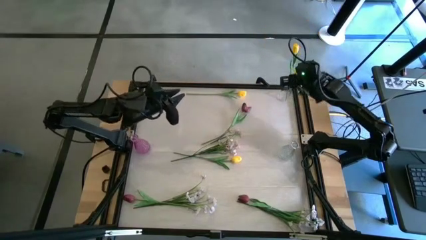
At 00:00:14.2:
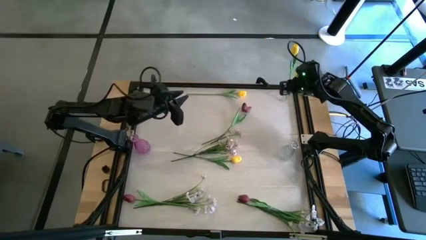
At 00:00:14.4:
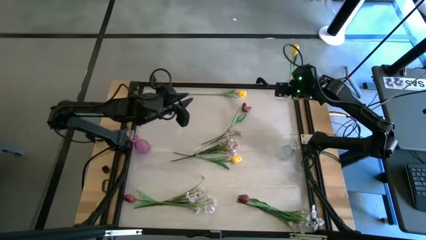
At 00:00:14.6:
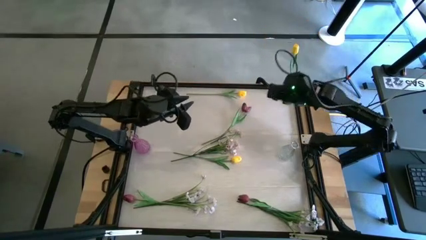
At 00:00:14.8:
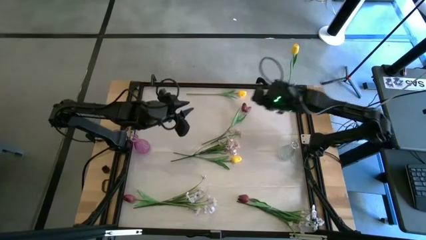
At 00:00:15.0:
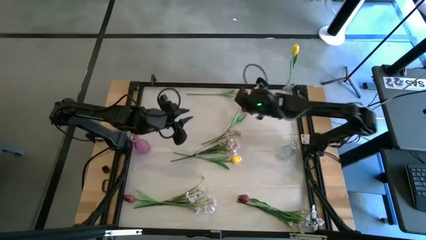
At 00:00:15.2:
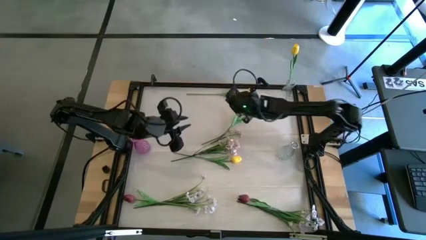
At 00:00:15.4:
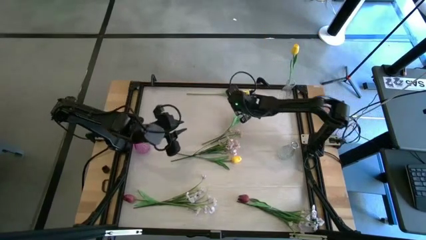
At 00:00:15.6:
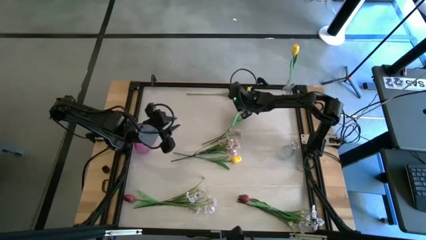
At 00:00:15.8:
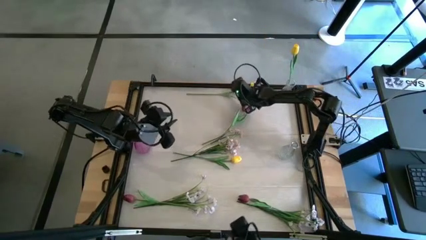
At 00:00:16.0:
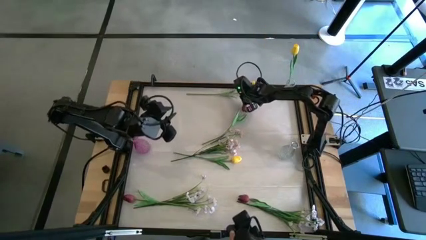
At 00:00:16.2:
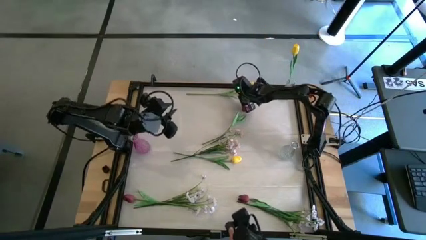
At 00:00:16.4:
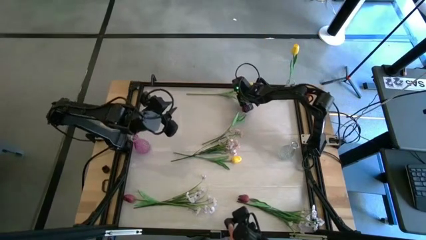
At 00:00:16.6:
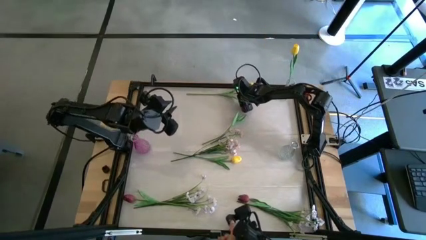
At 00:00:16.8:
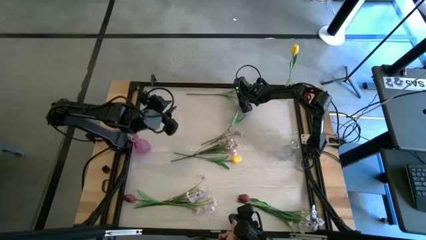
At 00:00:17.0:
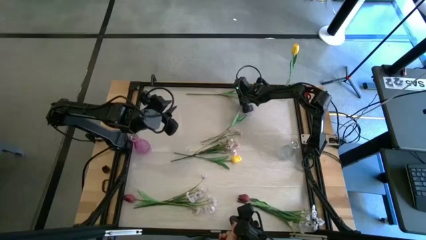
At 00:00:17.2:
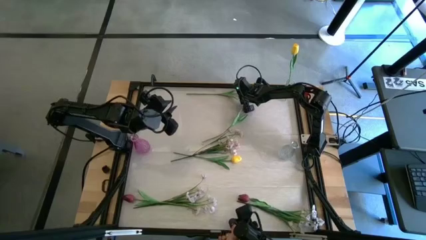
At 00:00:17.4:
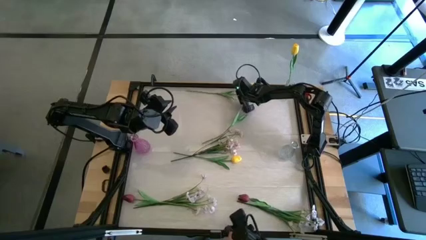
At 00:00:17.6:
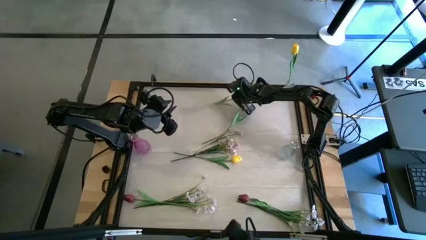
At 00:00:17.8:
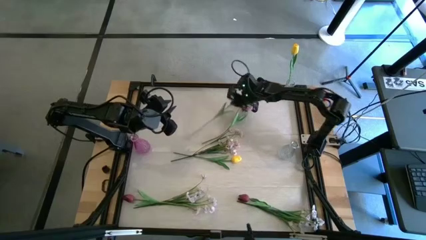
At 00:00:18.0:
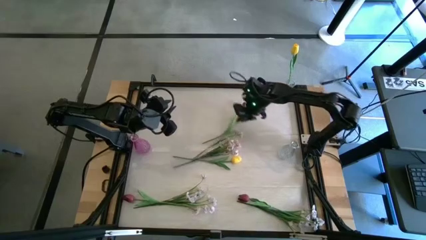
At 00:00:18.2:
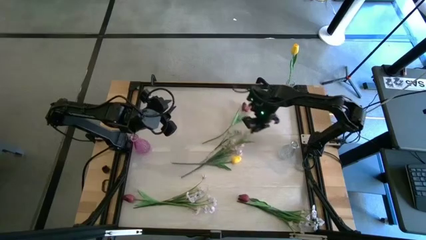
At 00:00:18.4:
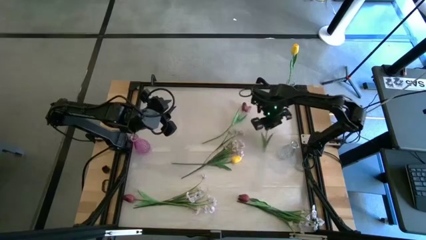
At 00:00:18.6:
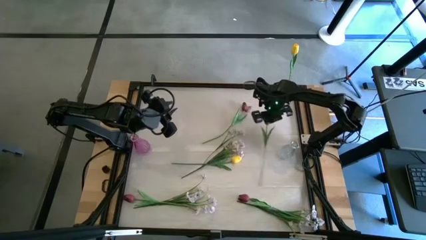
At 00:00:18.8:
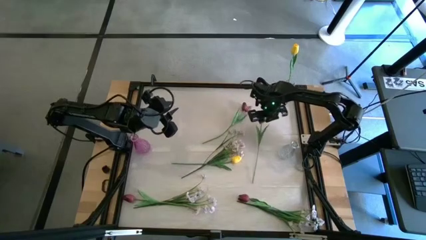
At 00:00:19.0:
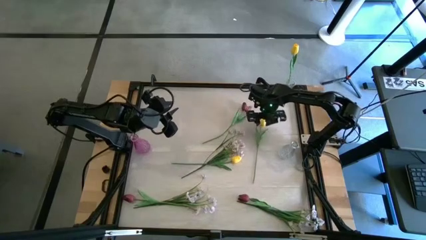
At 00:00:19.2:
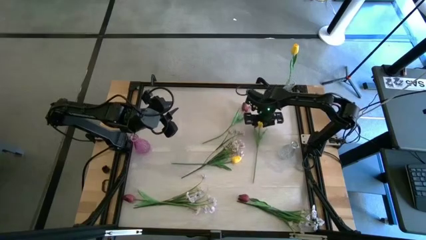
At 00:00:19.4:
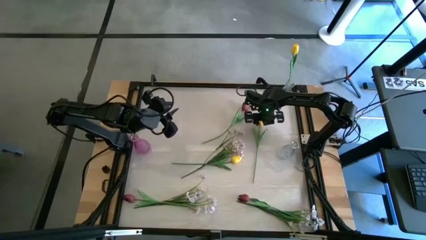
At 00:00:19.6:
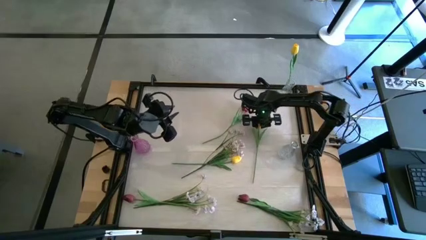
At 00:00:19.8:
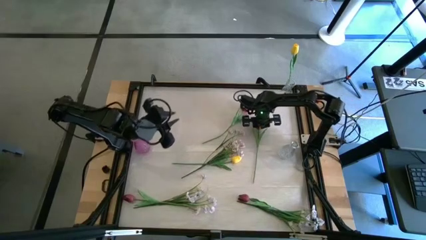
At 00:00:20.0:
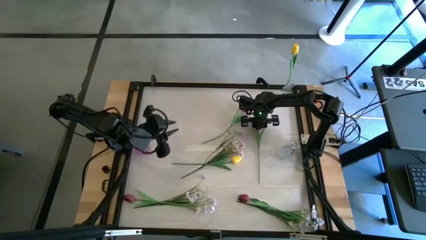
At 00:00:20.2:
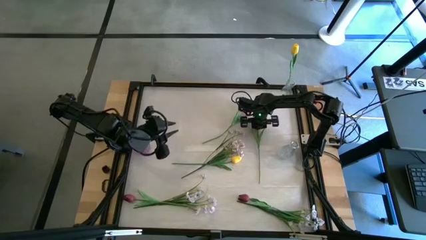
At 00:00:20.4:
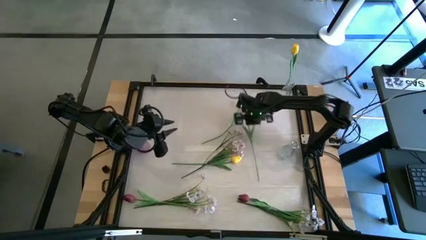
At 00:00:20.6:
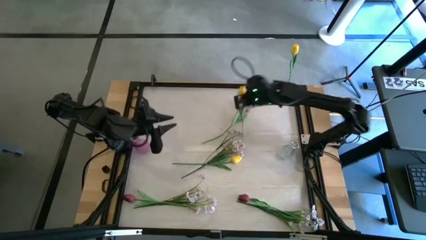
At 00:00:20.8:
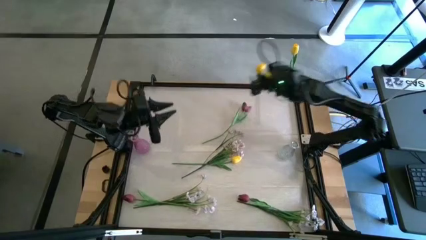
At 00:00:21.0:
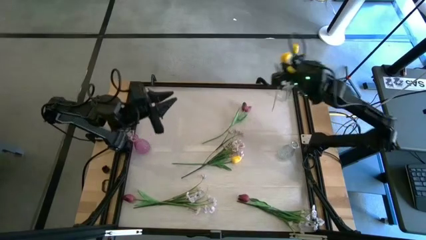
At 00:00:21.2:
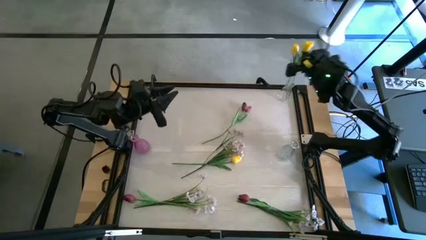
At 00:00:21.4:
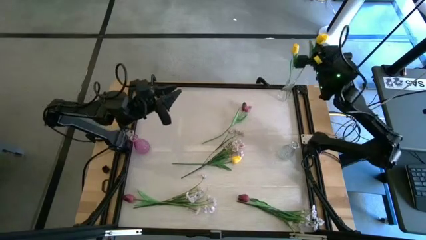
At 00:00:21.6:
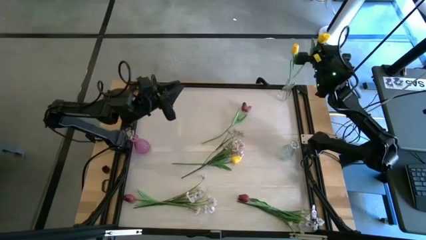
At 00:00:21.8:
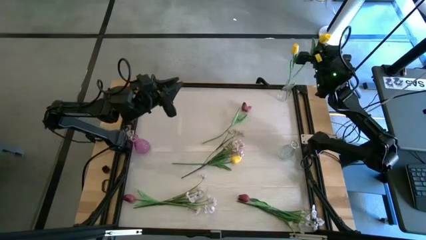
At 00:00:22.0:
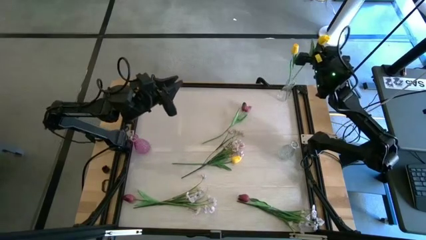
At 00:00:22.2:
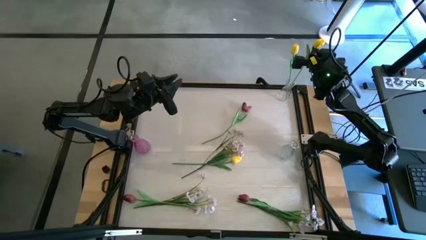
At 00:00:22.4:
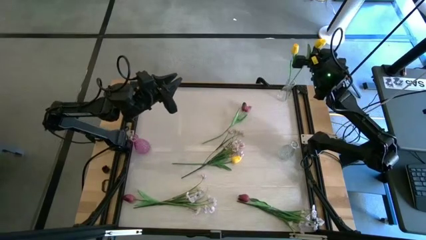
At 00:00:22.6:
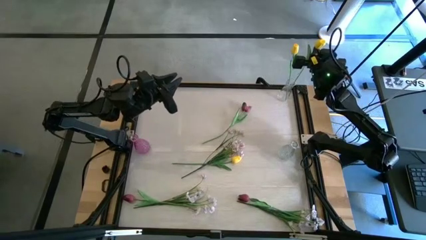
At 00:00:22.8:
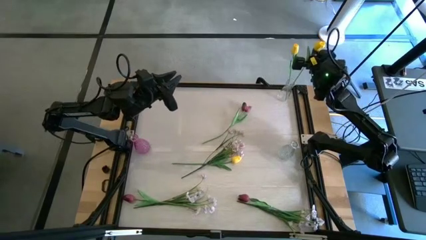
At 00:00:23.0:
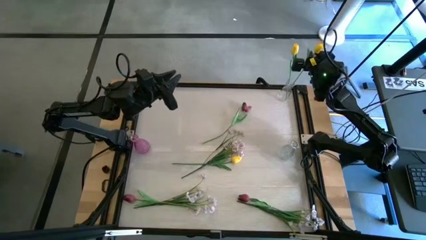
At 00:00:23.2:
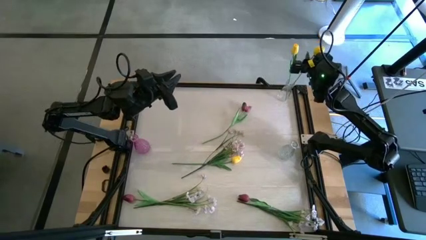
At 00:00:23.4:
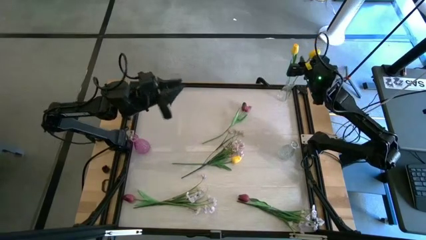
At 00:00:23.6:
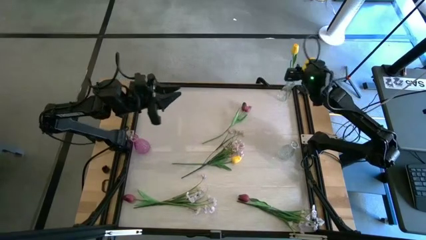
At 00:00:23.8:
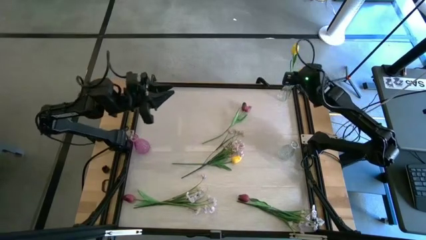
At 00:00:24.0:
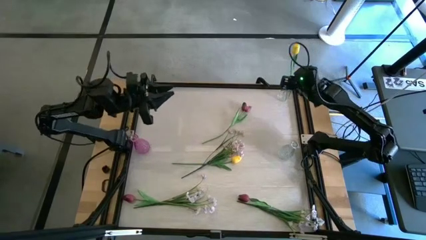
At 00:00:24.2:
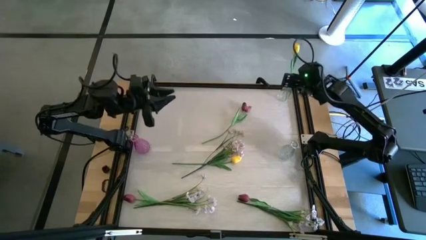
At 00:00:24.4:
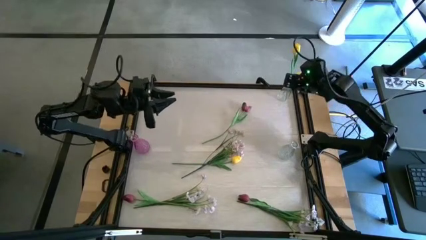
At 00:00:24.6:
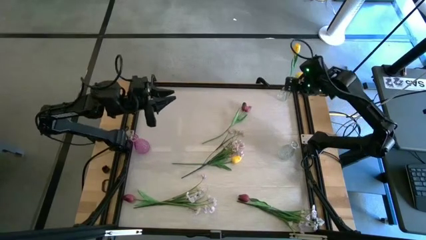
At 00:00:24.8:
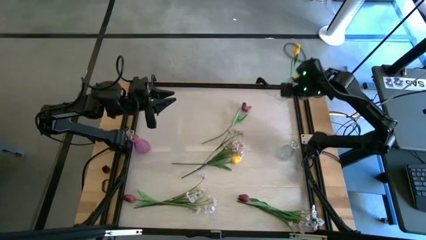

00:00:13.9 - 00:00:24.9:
Task: Sort flowers into vase by color
Put the top yellow flower into the top transparent vase

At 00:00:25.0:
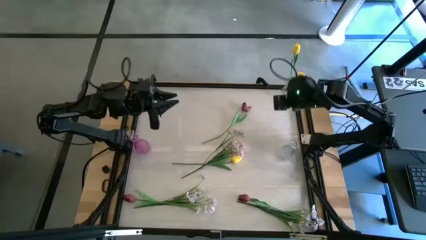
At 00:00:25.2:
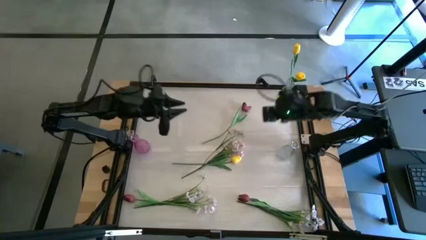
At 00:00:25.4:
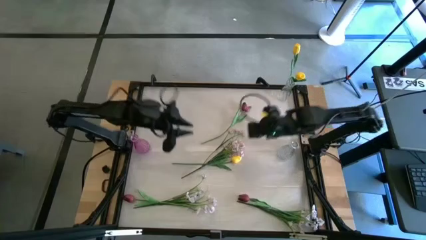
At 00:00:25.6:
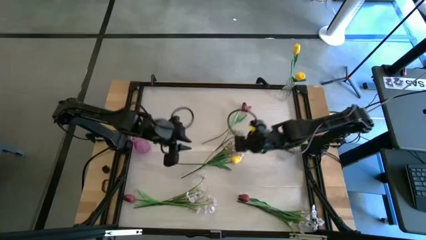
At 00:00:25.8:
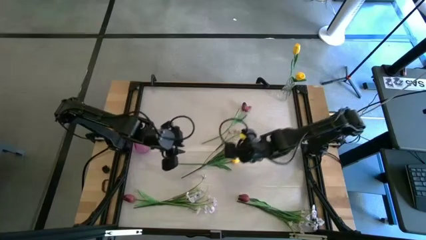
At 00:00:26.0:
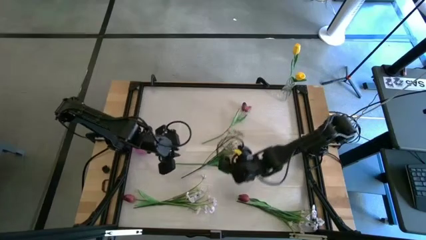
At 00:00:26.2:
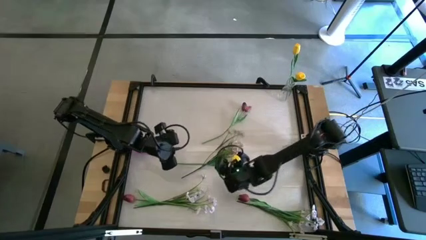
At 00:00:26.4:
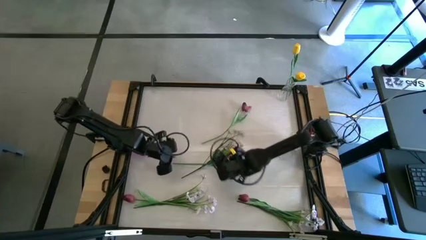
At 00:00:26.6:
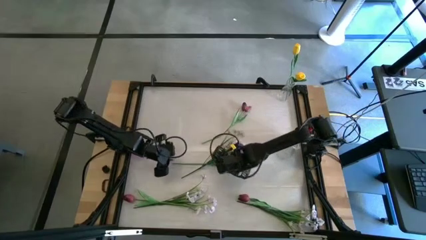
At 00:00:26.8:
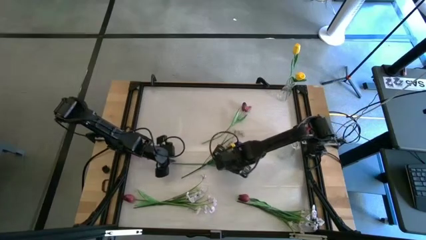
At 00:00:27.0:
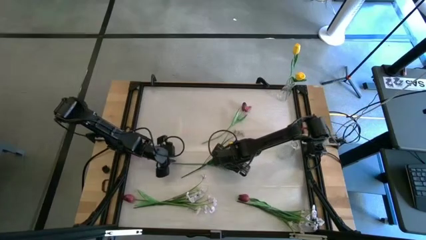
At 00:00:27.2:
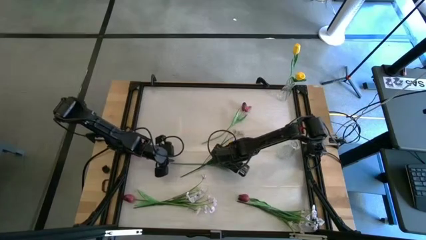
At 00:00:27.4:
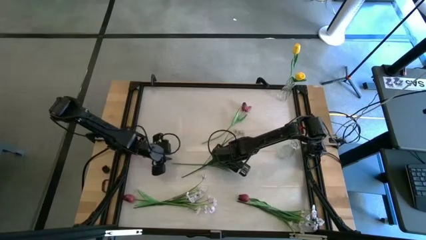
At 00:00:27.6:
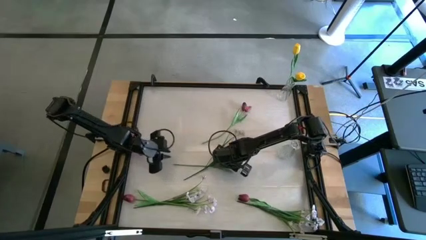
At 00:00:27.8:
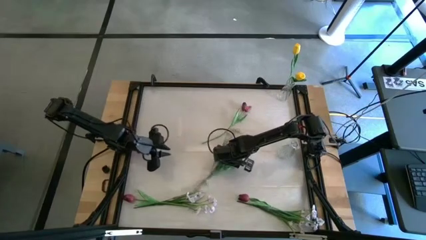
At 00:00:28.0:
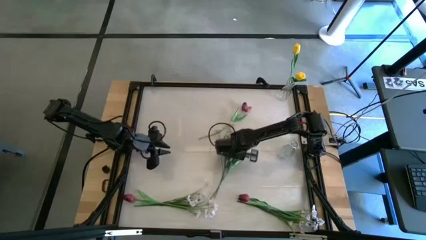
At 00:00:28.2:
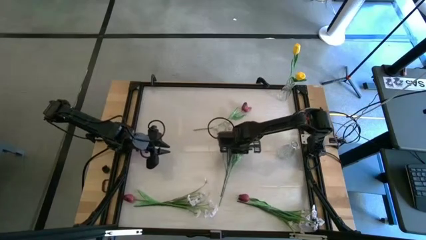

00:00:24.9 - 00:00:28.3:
Put the yellow flower into the top transparent vase

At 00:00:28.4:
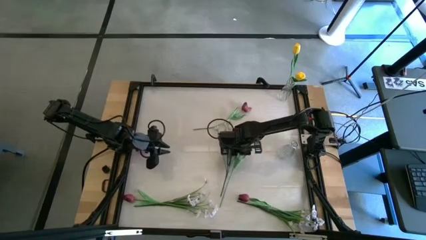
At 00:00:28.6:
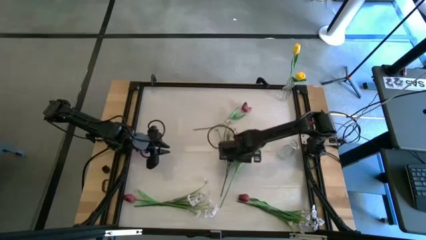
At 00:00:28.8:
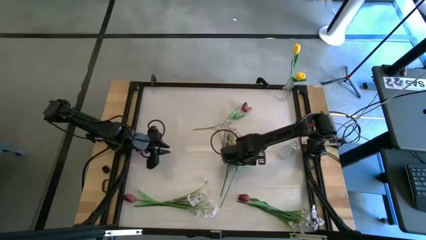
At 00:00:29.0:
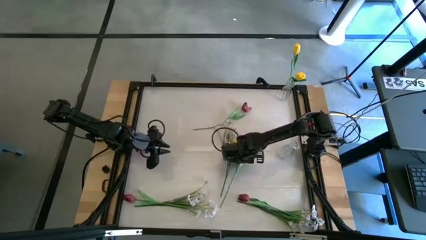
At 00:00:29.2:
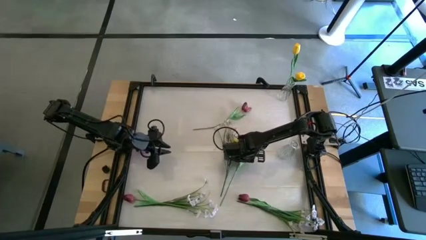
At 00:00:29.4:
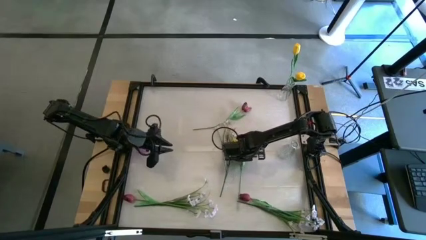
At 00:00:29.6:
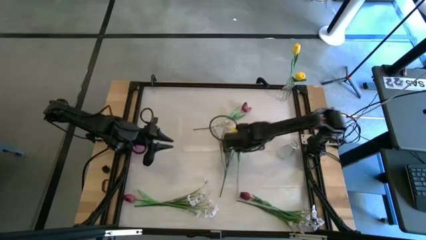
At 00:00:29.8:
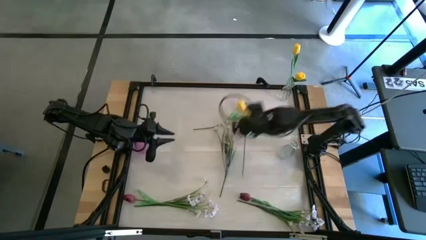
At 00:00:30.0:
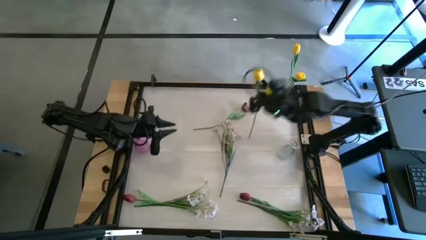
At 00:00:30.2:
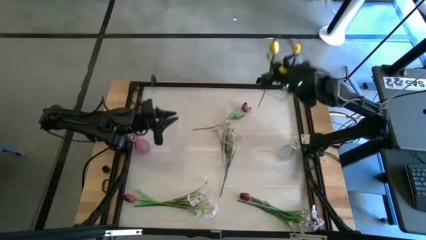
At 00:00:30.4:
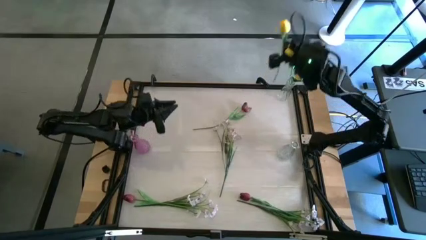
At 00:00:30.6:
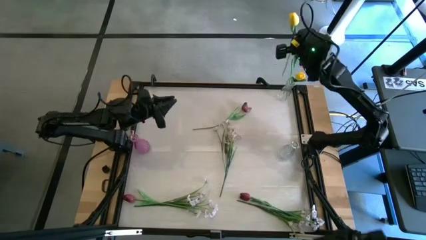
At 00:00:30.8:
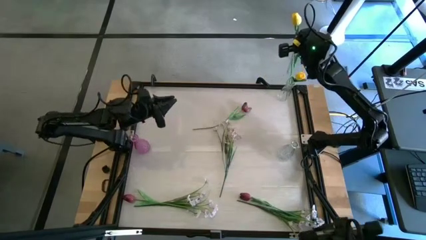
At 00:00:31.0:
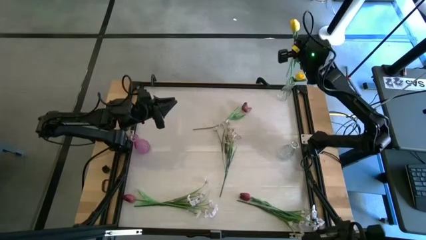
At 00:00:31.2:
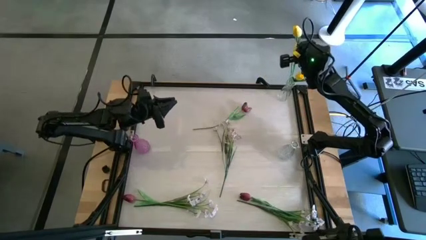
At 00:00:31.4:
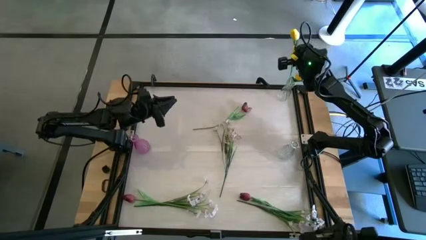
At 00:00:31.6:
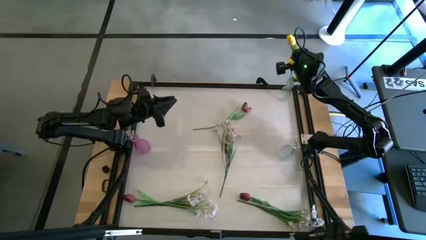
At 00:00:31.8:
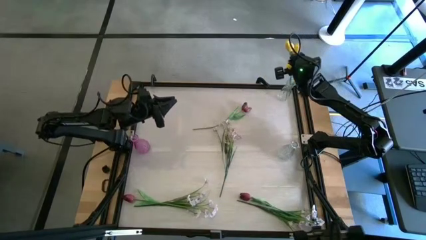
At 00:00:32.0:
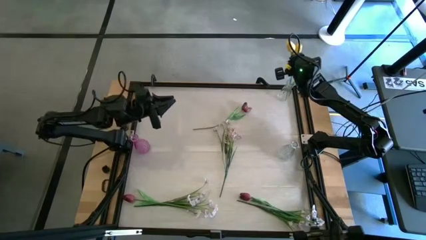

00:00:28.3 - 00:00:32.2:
Put the yellow flower into the top transparent vase
